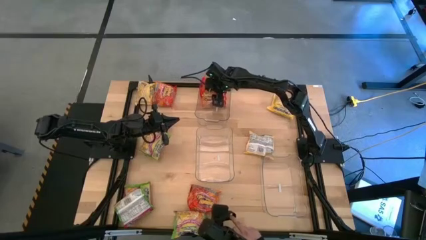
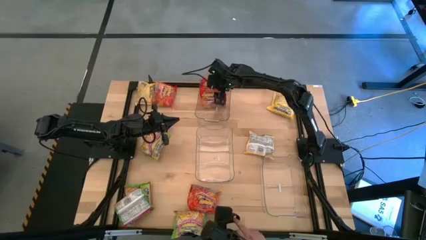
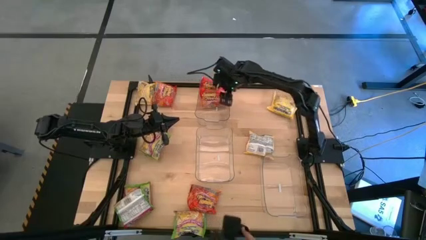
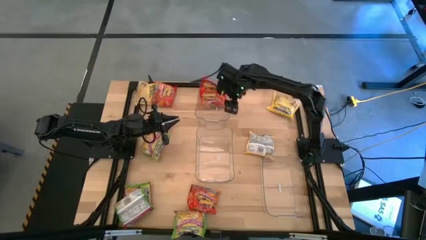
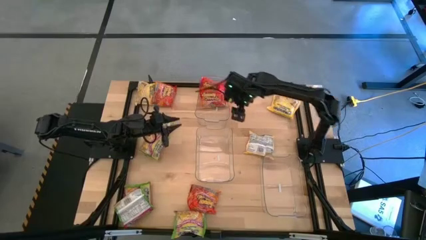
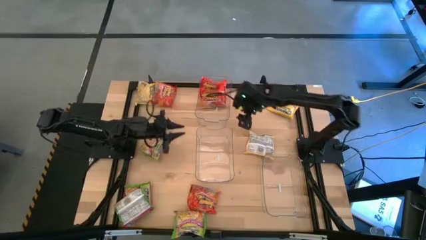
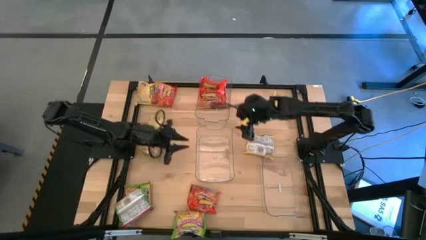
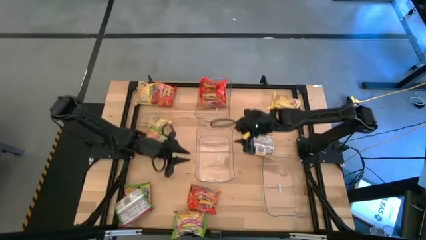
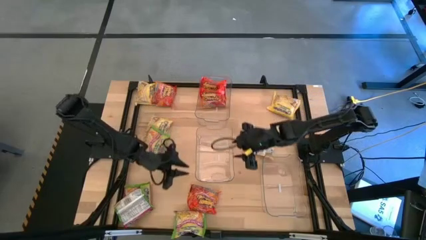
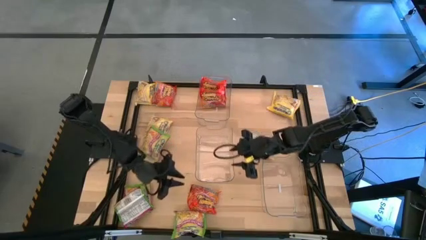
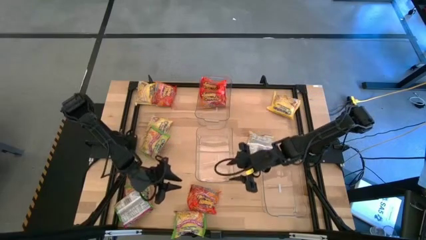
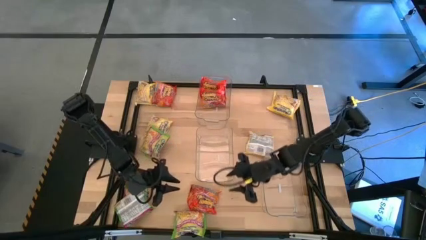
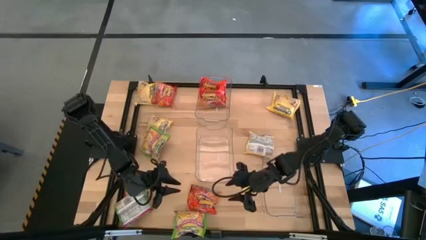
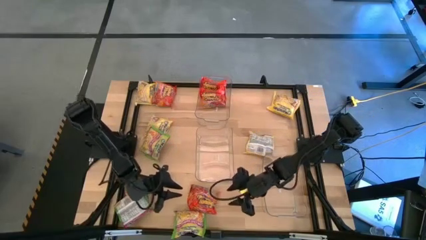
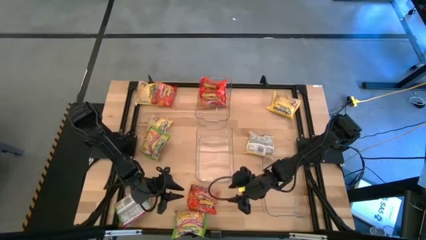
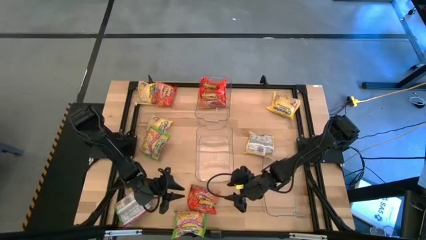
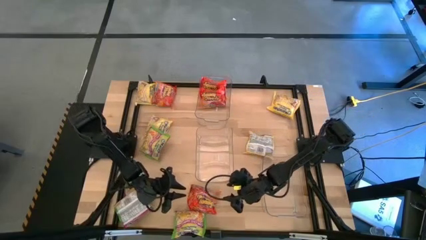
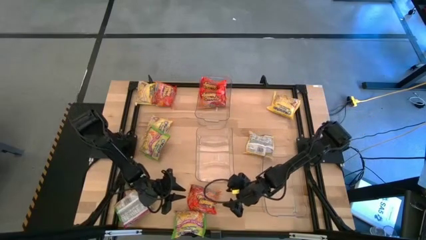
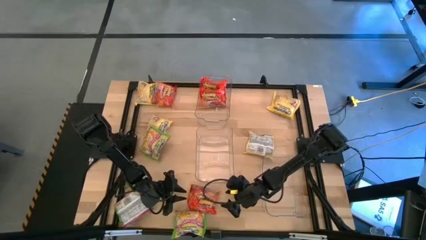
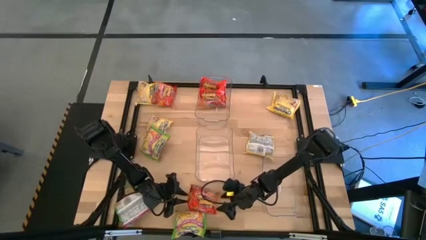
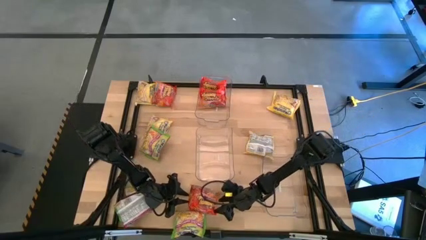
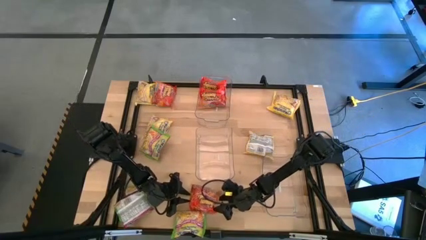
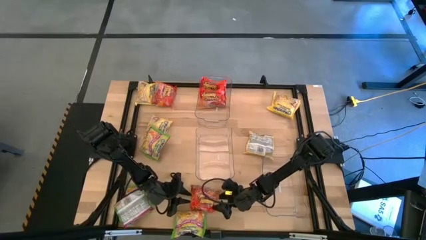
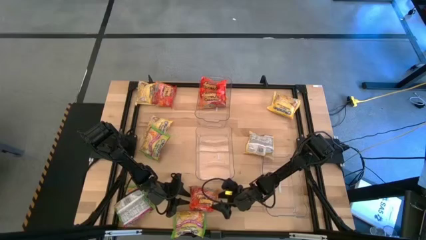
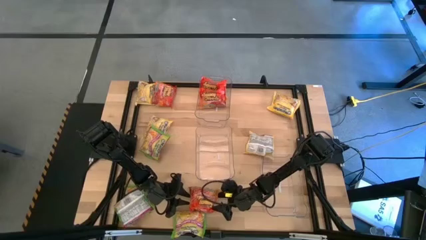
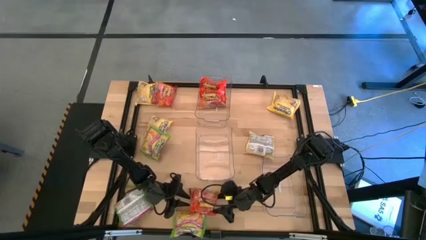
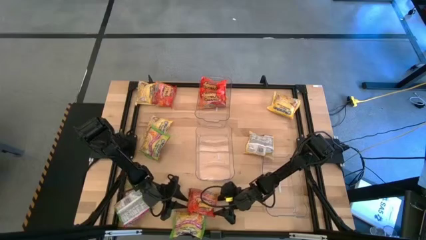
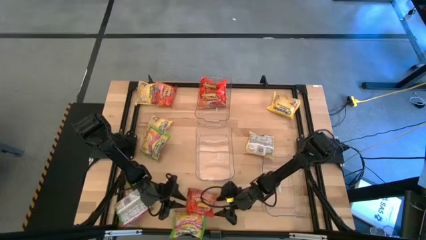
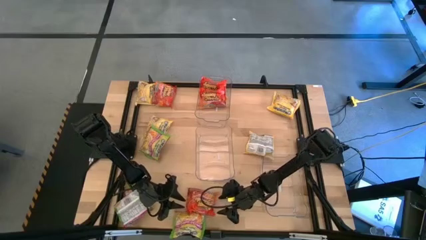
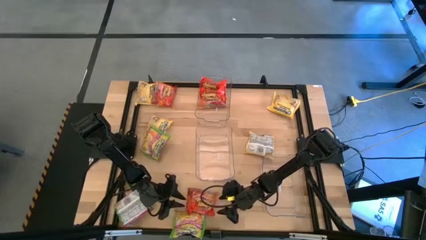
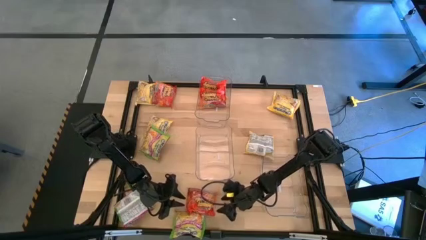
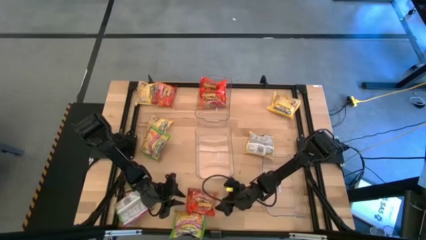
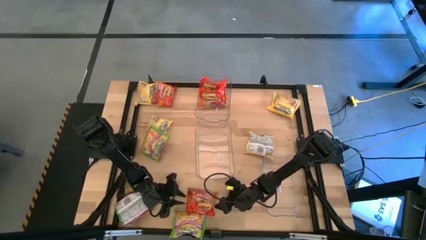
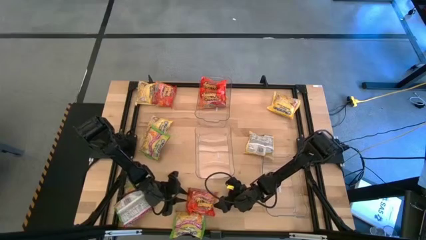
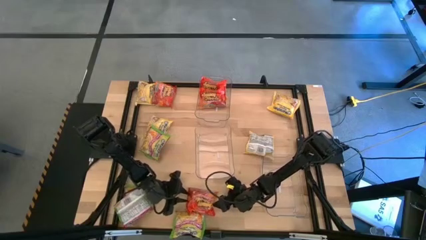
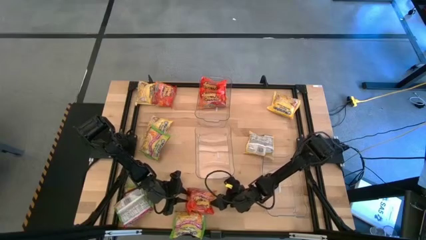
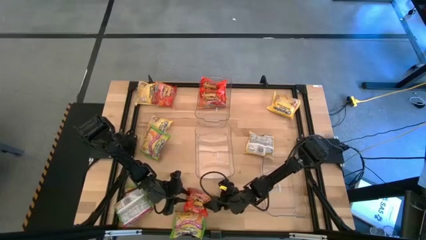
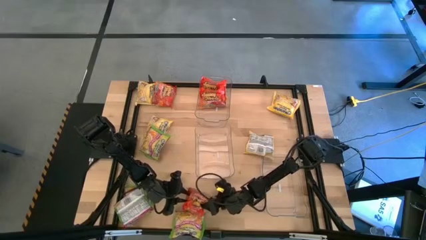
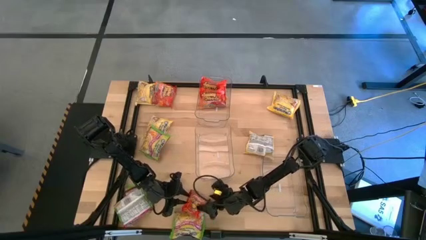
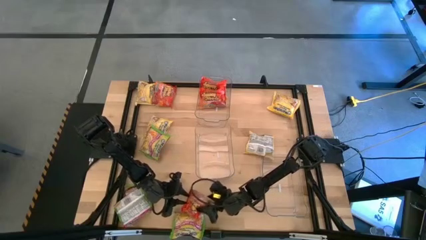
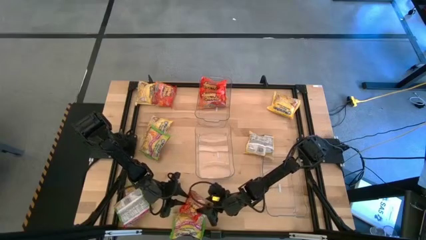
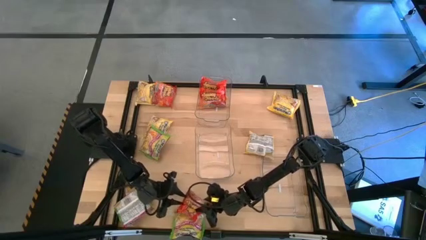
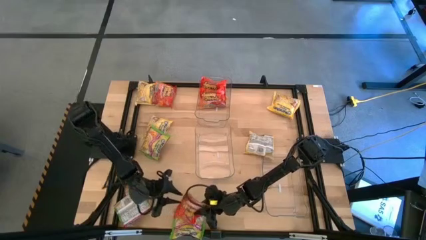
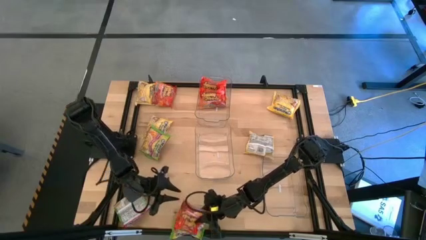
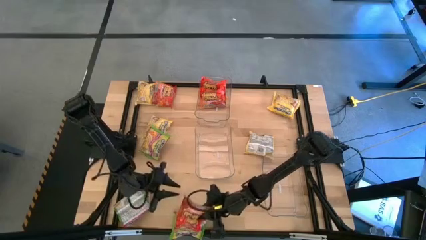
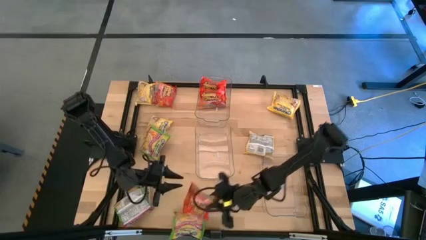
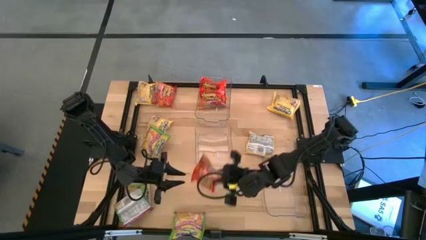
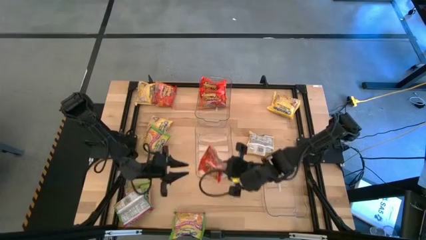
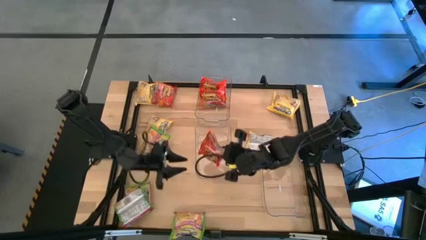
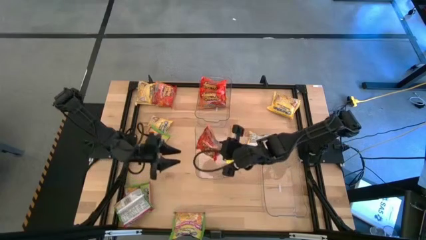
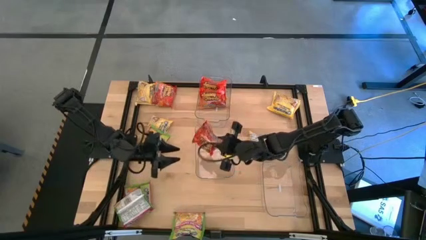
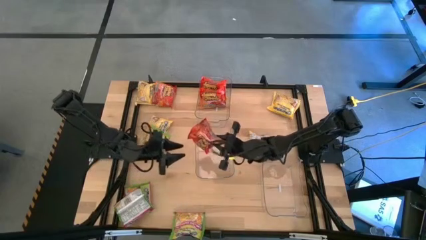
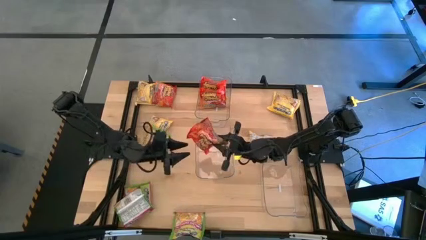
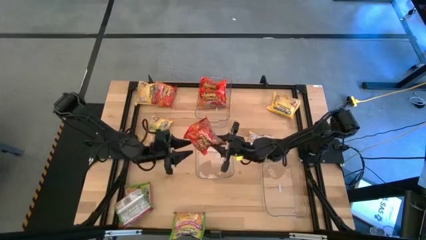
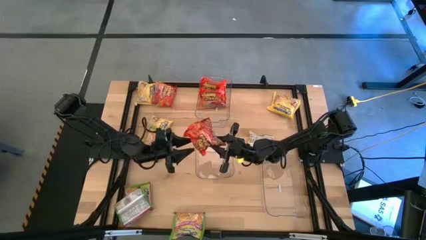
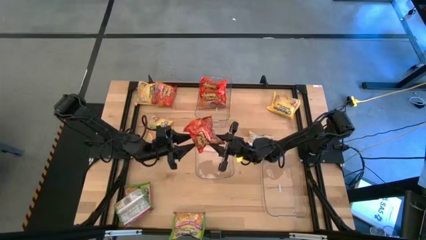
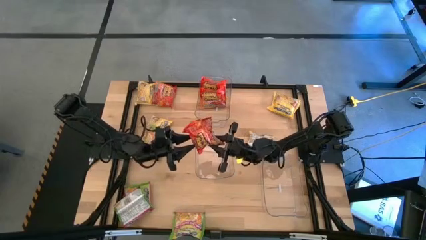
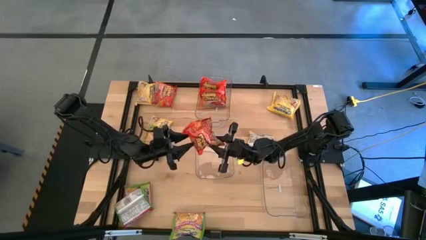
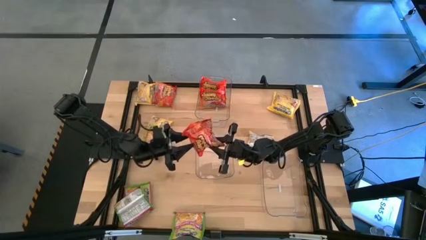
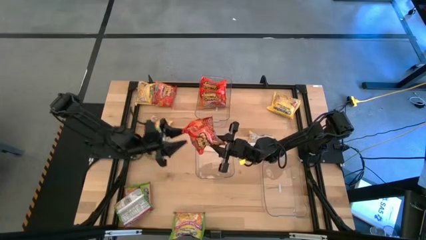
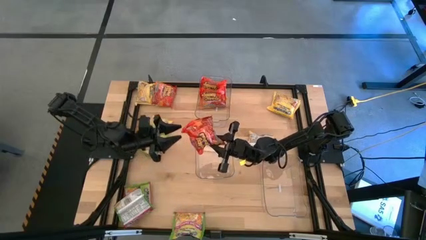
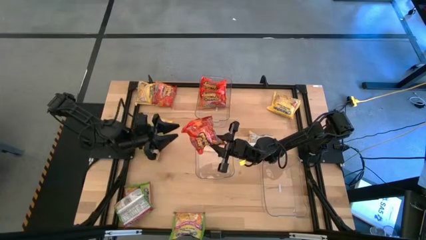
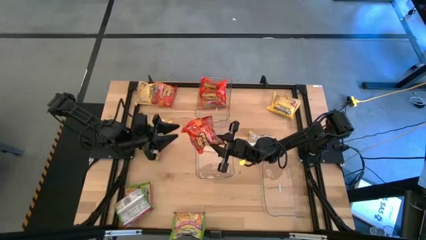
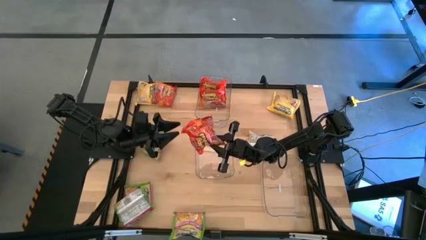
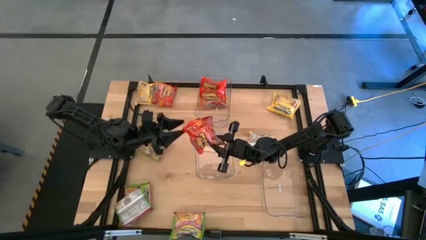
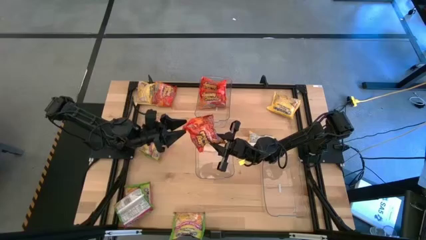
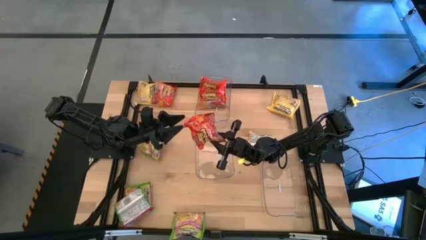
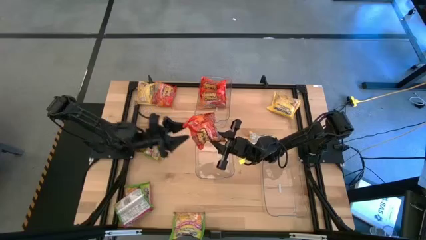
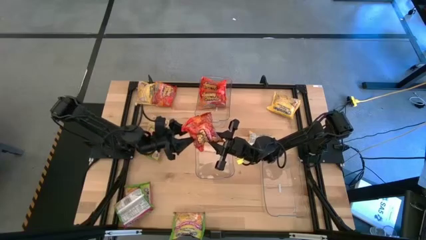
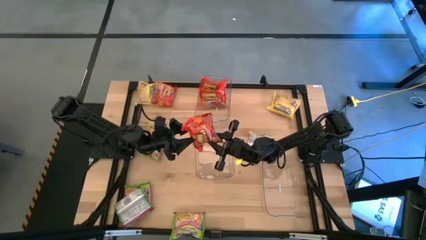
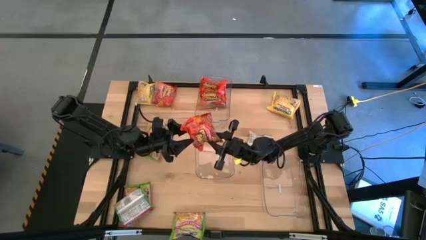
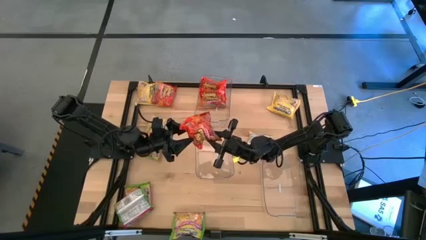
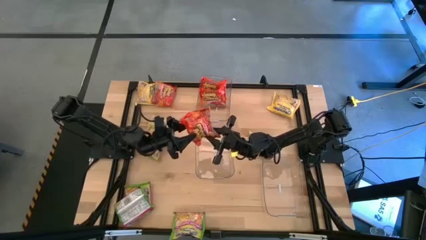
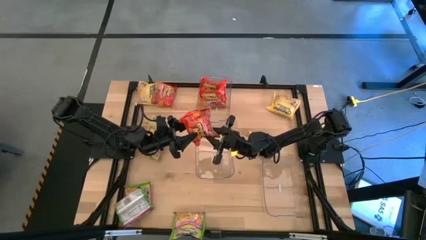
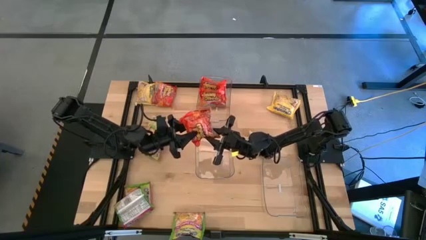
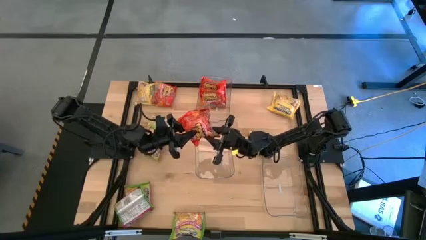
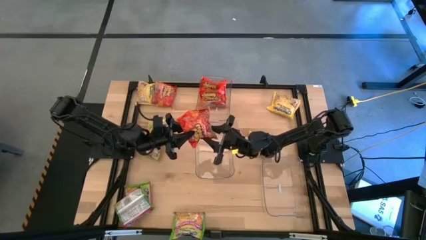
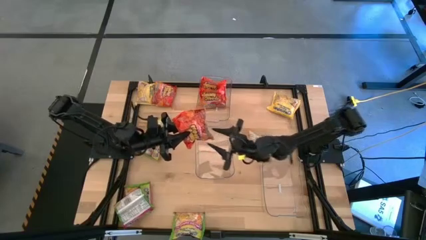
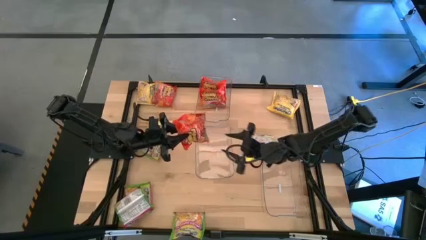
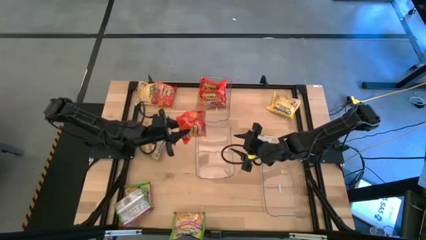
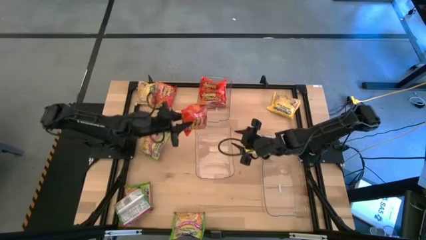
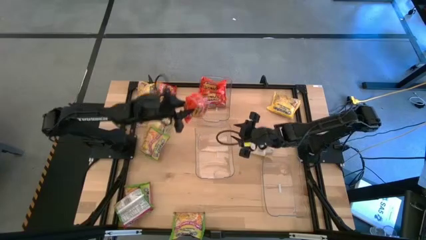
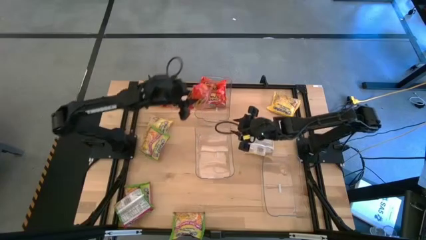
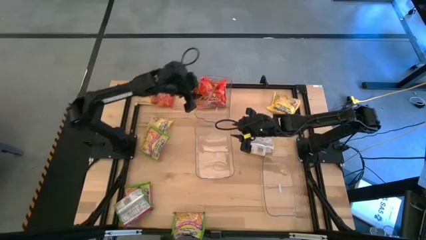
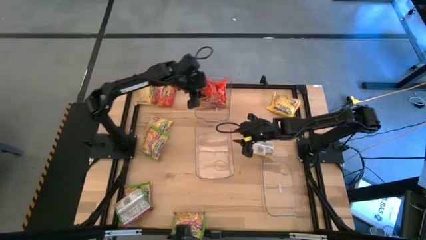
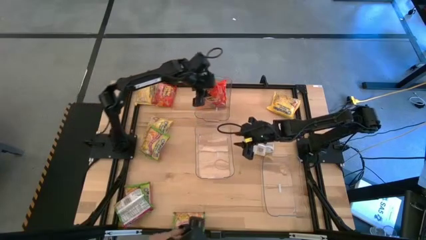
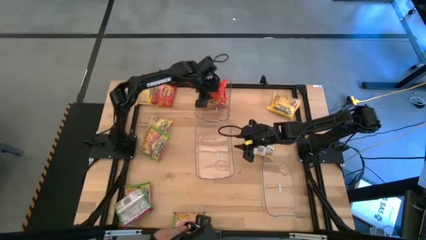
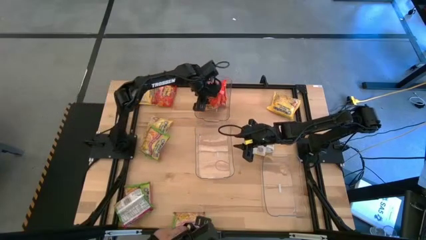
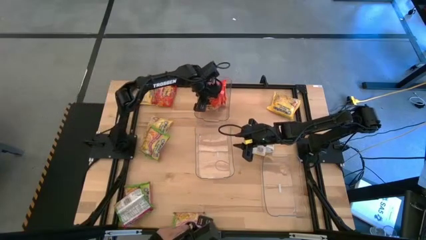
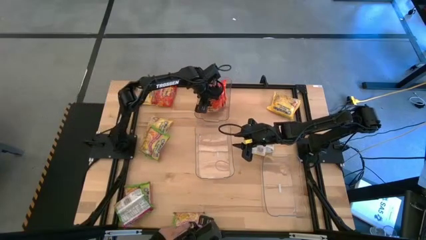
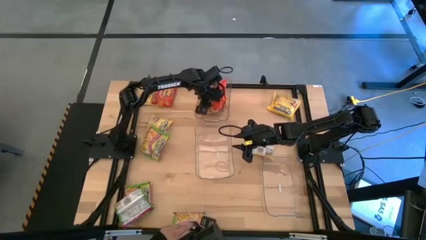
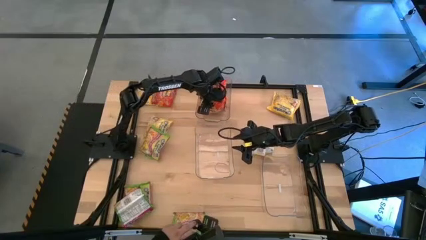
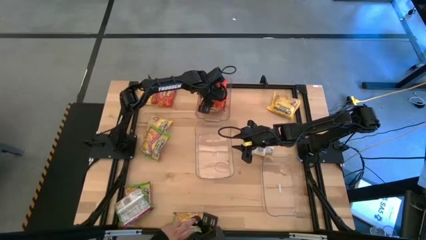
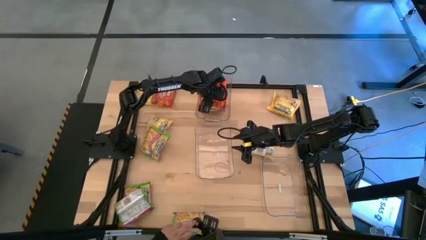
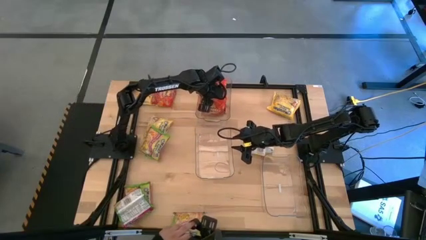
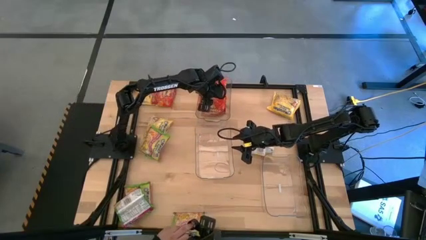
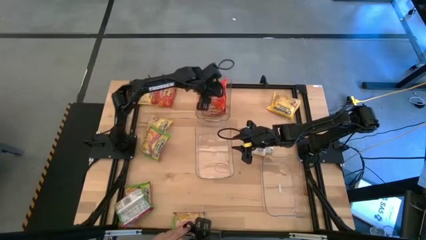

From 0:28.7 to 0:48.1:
Task: Sort Maruchan noodles
Put the orange noodle pack into the top transparent bin
